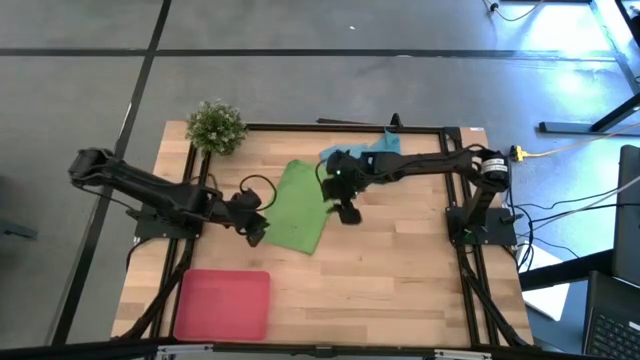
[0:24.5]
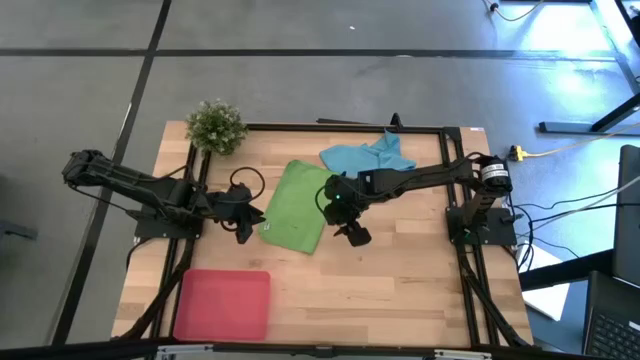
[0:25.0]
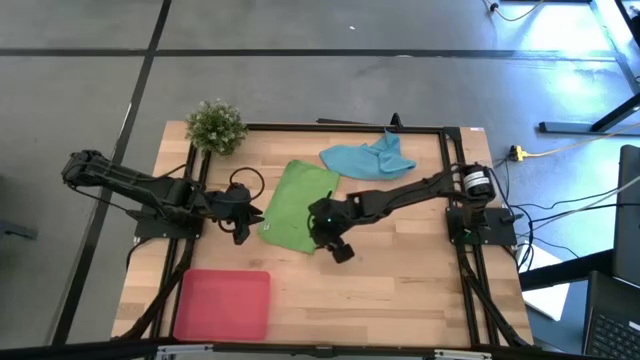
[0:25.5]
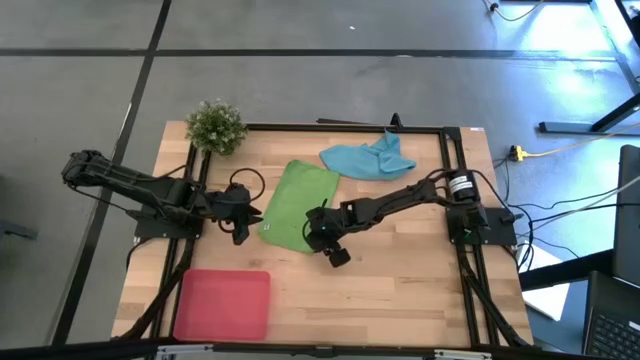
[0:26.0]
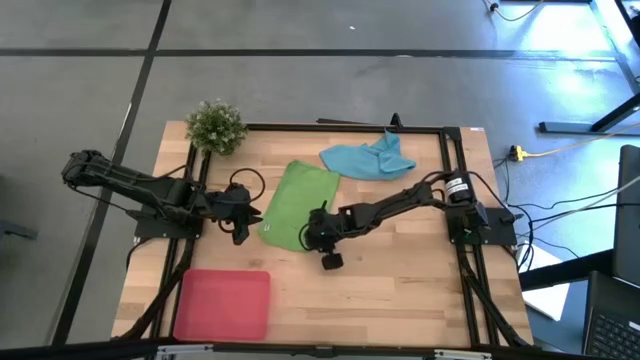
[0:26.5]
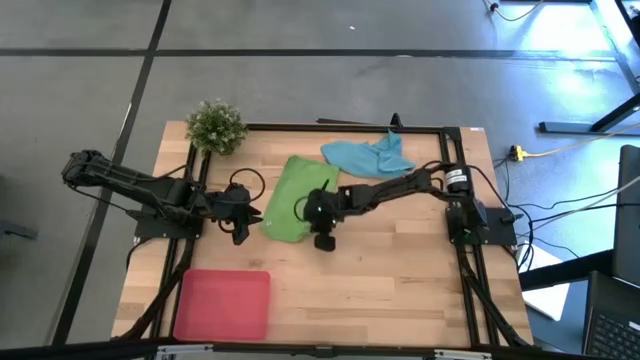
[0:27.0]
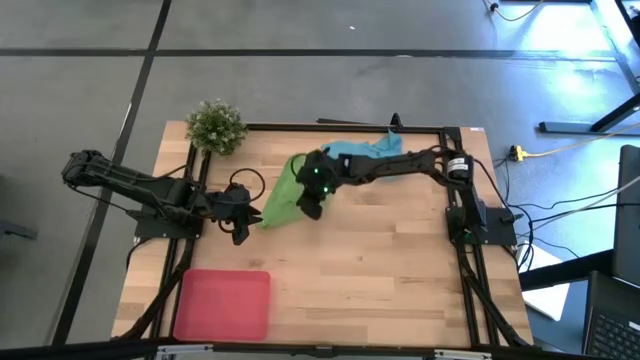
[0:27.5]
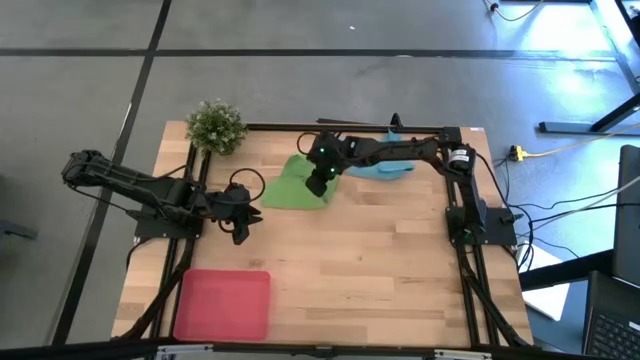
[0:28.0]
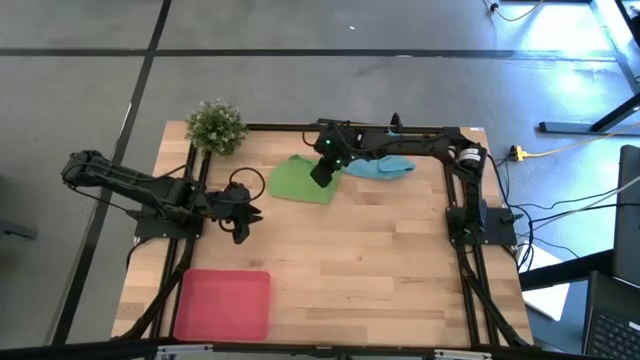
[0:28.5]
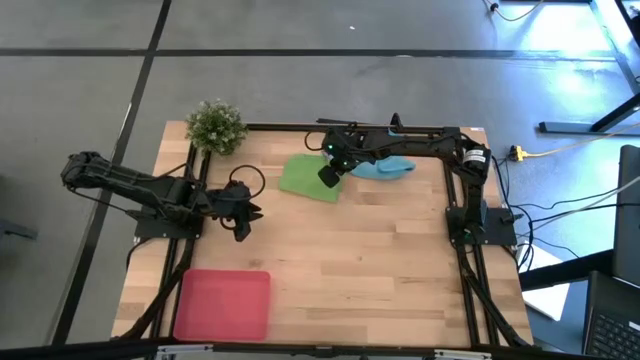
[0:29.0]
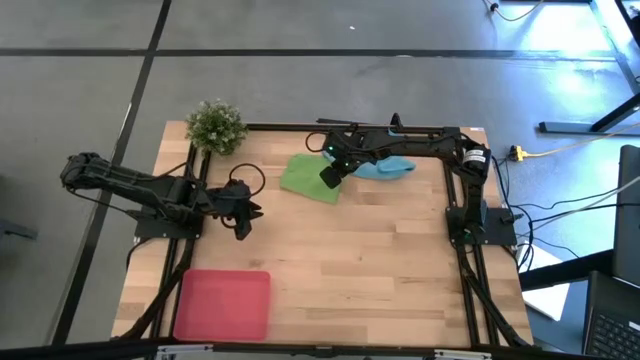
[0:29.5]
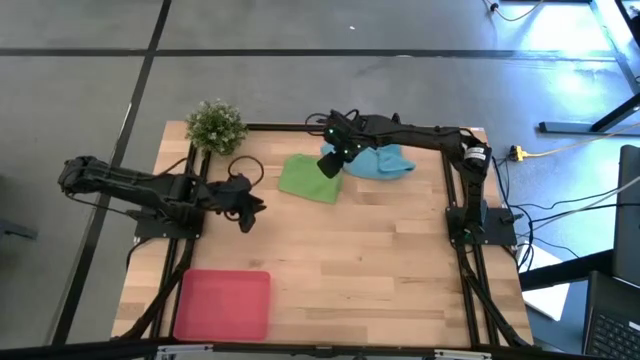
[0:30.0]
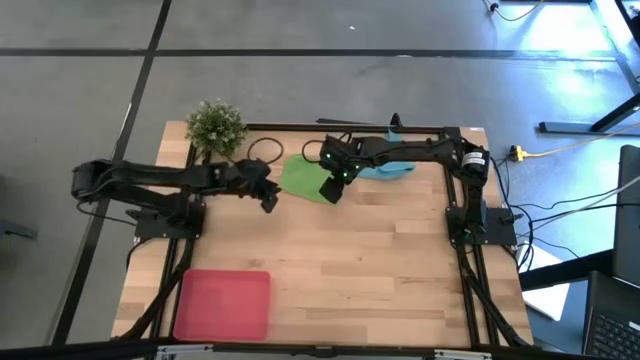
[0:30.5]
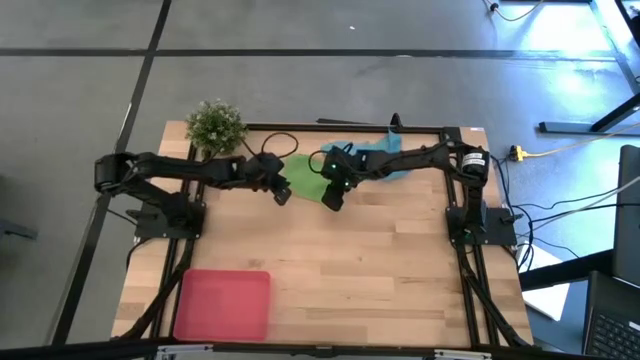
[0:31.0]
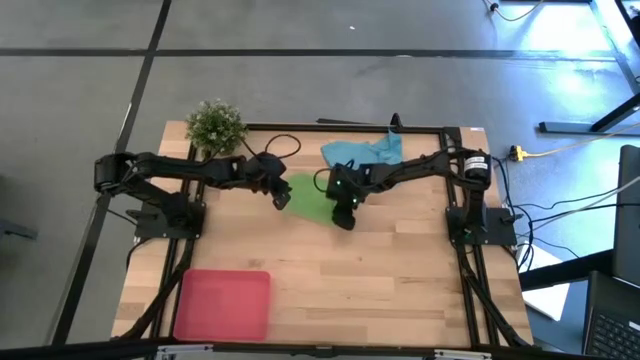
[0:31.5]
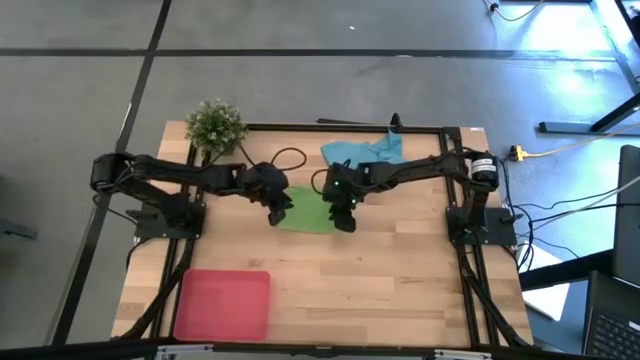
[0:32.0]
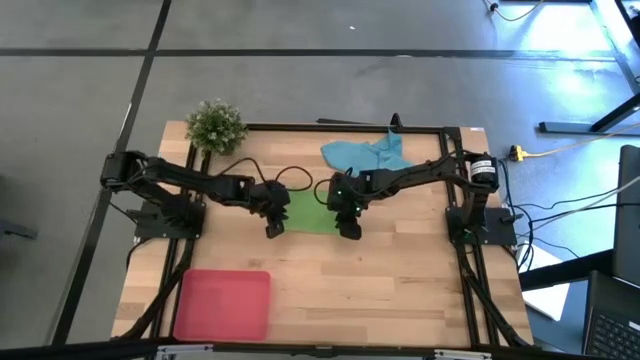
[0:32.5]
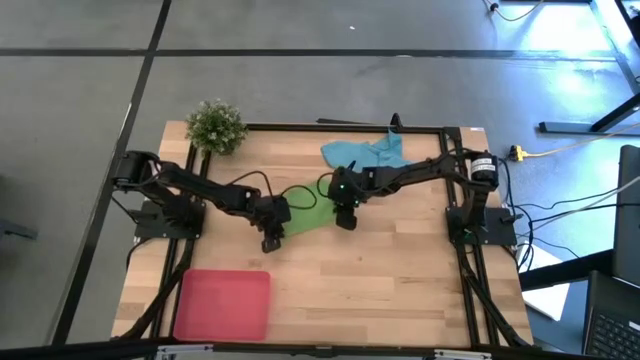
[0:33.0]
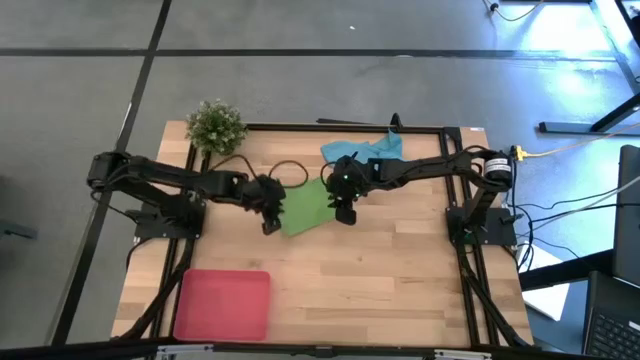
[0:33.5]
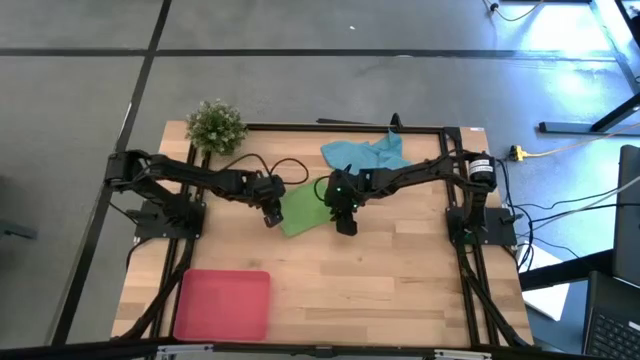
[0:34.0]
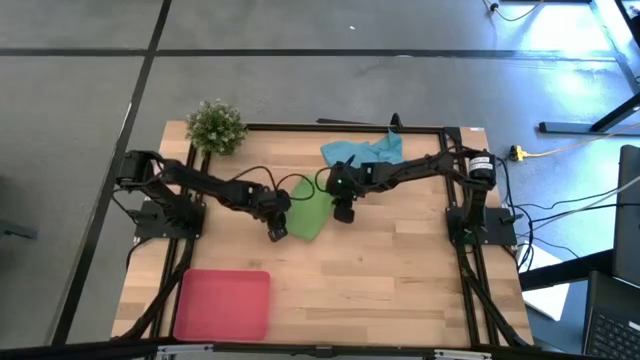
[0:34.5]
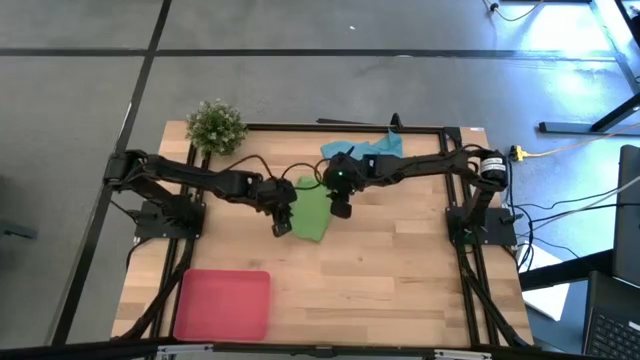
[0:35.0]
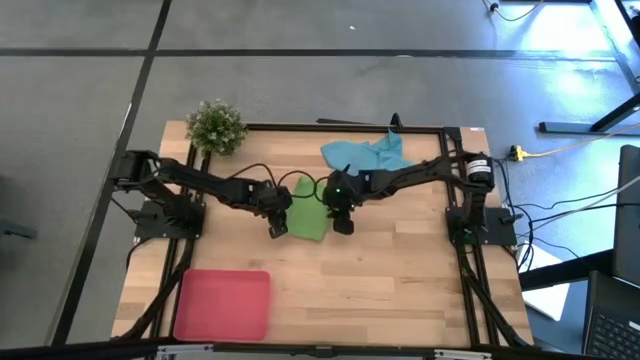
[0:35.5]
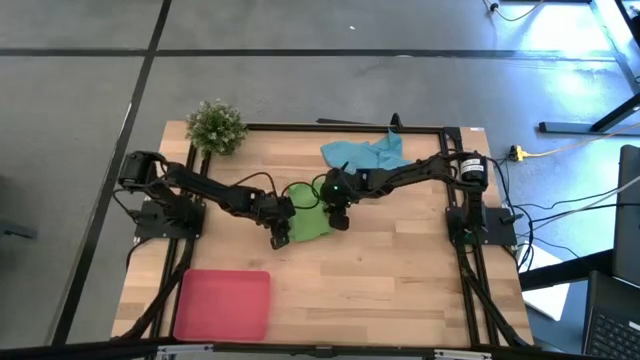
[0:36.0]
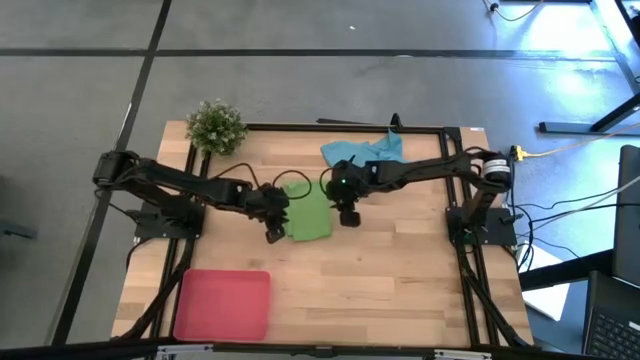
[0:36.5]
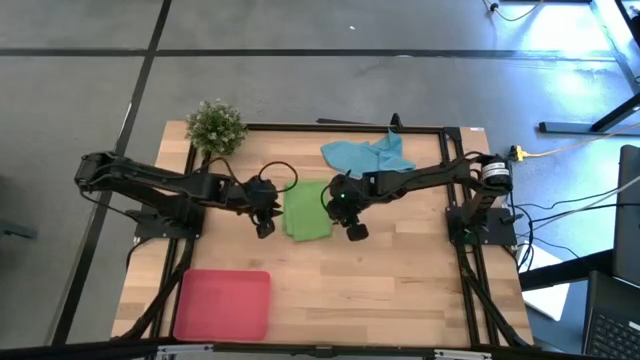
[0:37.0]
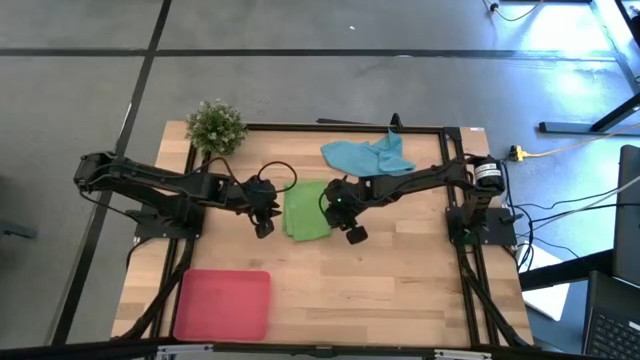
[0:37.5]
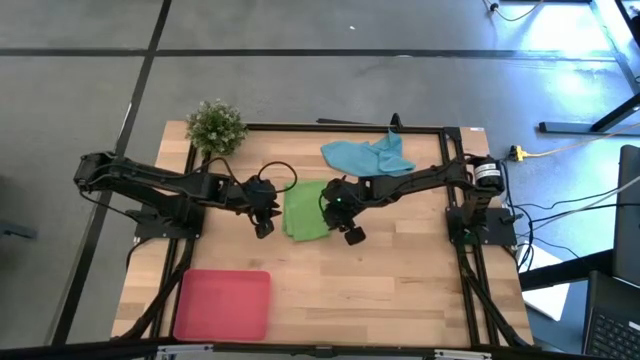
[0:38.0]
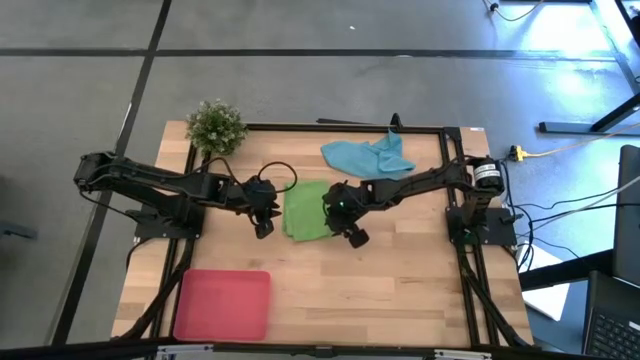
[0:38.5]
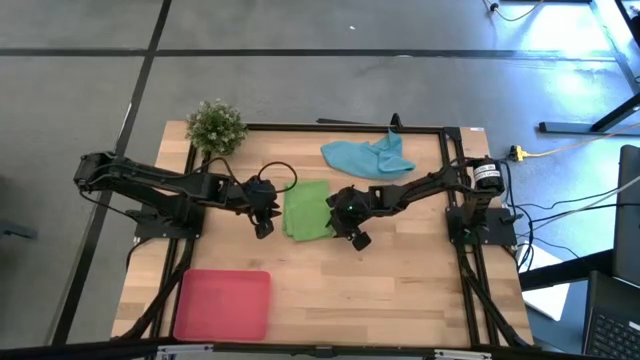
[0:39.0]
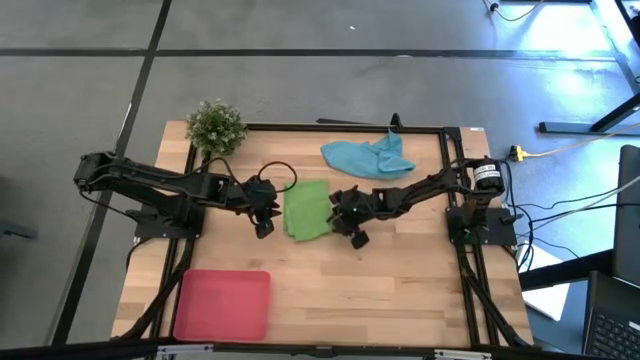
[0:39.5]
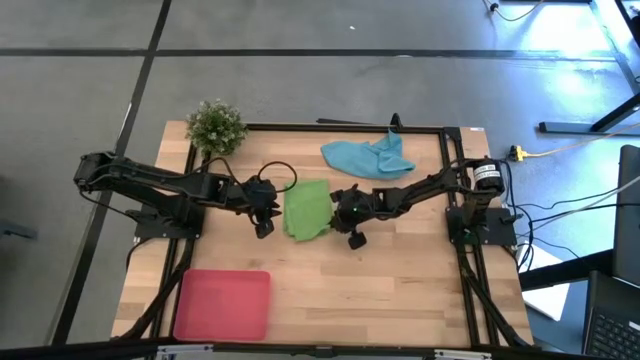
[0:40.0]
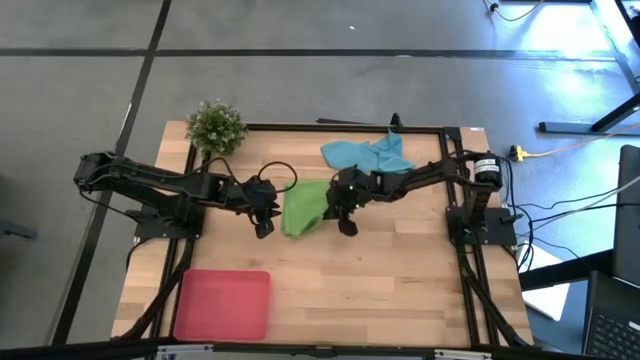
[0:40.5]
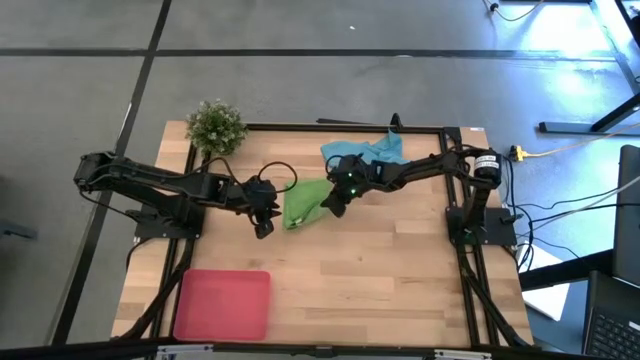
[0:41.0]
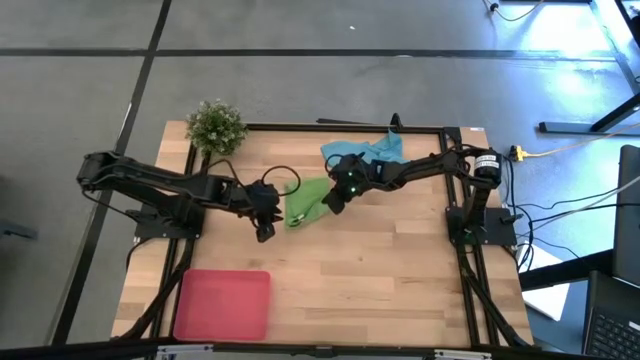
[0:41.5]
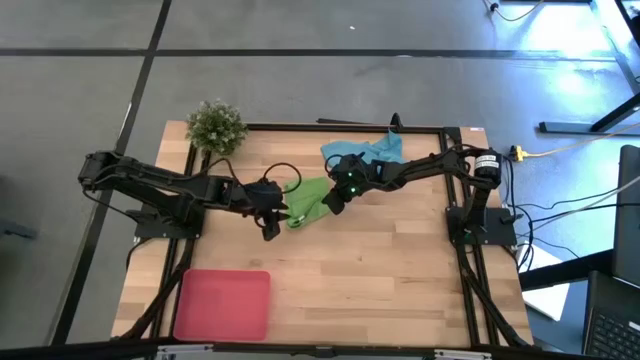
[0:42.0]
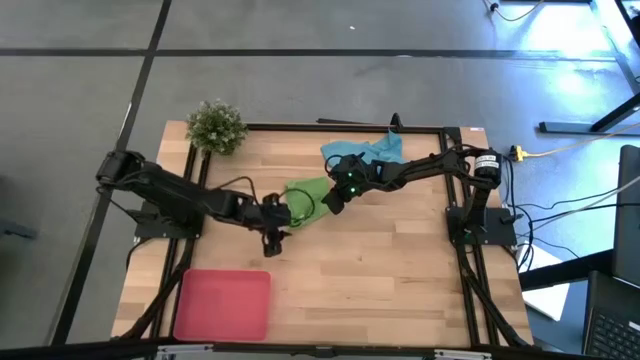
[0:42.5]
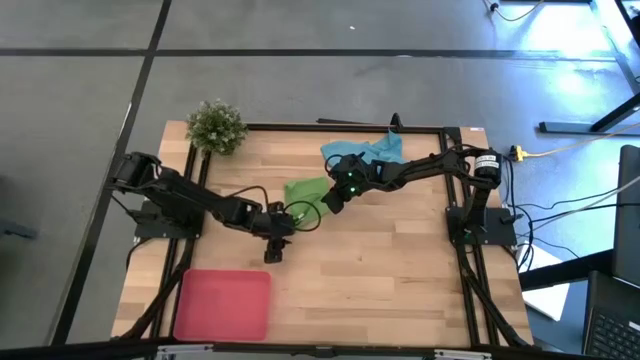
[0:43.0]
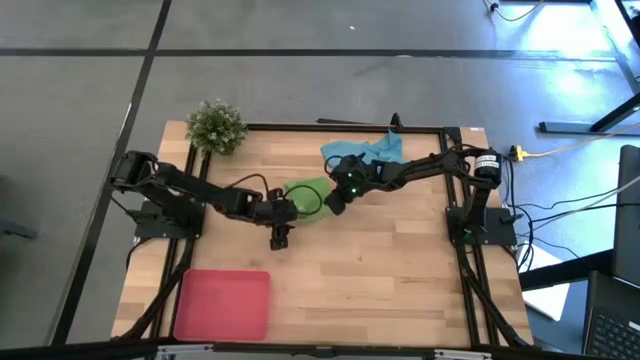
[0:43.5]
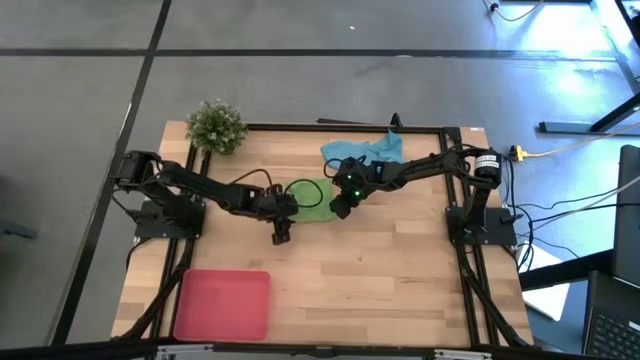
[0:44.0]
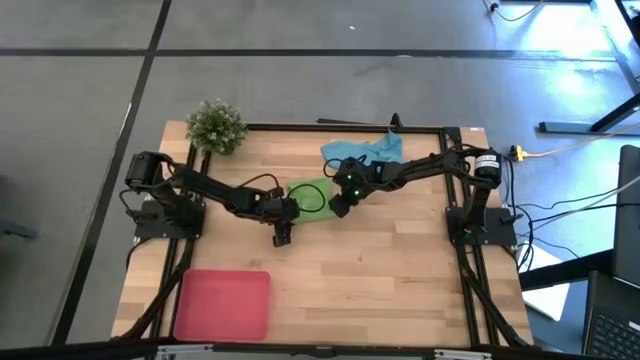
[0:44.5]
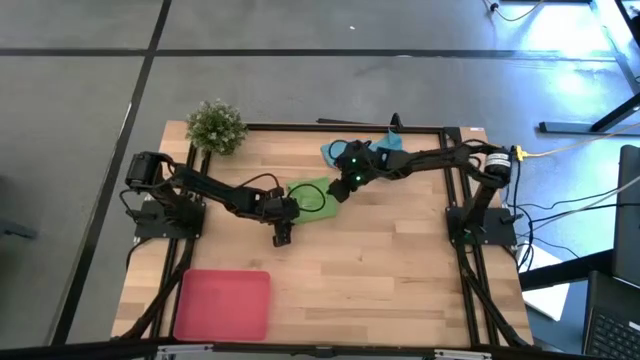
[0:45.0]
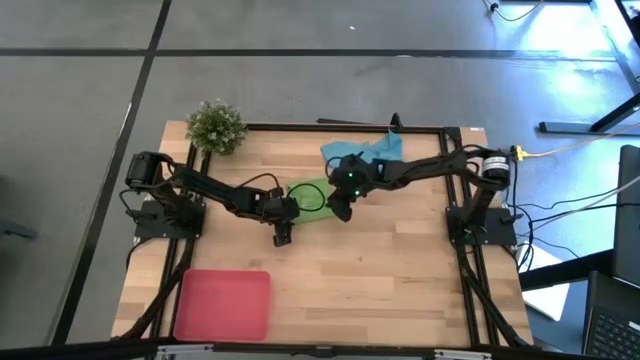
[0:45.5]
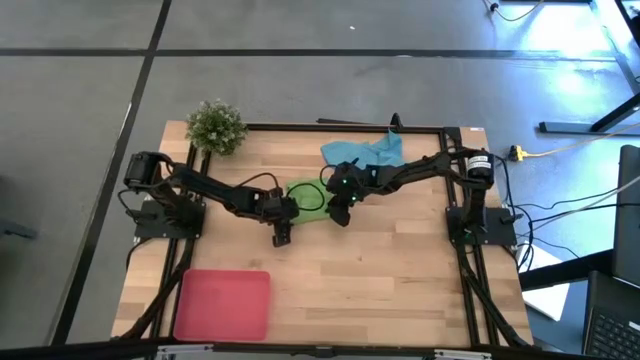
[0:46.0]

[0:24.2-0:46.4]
Task: Roll microfiber towels into tight, uniform cylinder then place into a basket
Roll the microfiber green towel
